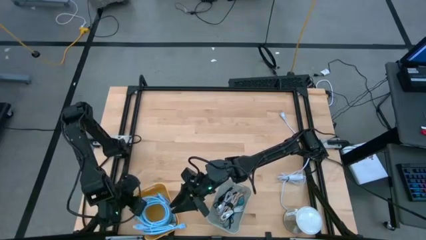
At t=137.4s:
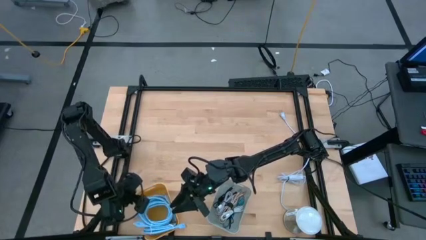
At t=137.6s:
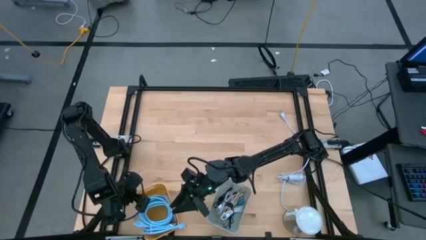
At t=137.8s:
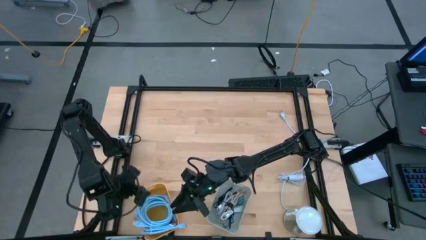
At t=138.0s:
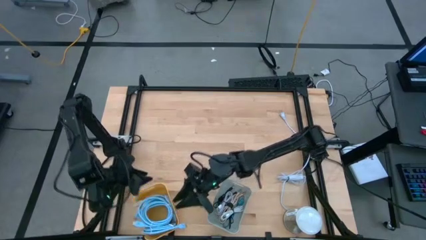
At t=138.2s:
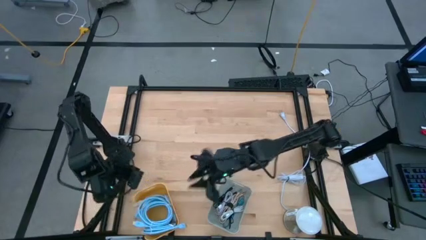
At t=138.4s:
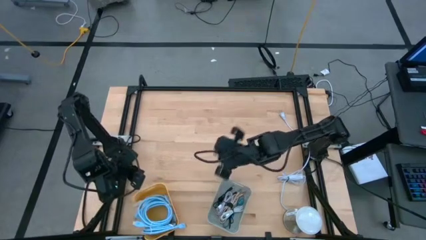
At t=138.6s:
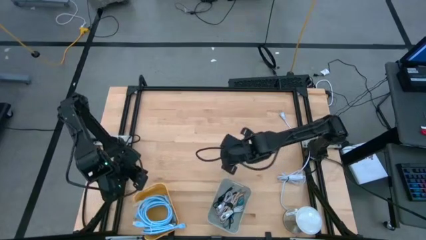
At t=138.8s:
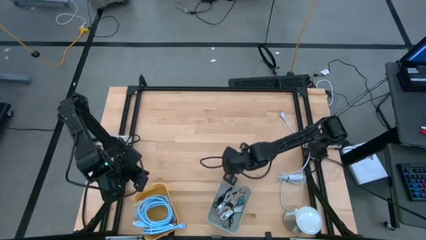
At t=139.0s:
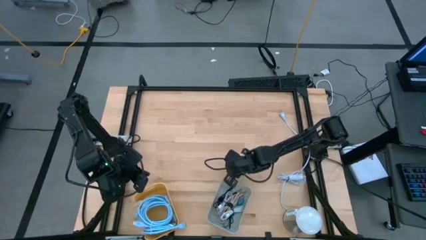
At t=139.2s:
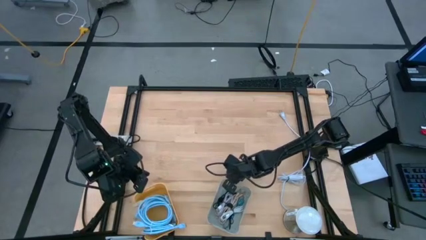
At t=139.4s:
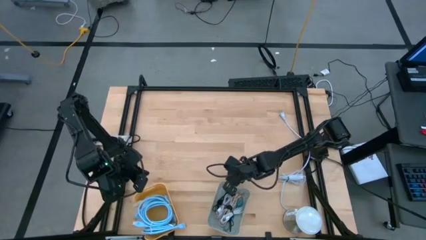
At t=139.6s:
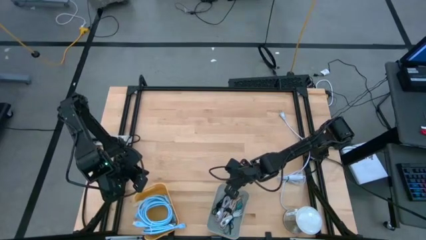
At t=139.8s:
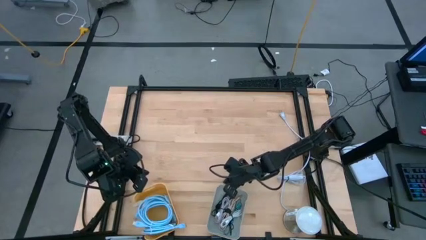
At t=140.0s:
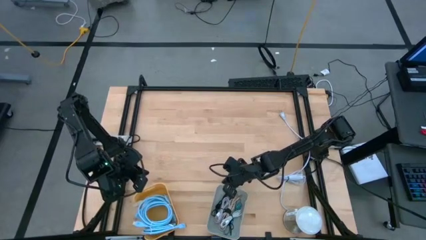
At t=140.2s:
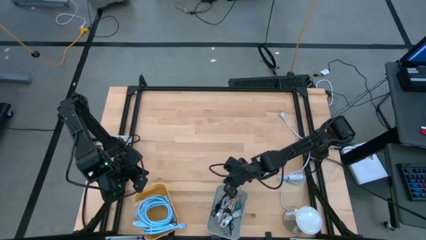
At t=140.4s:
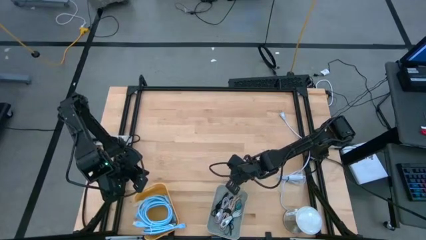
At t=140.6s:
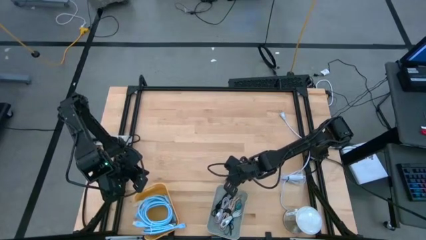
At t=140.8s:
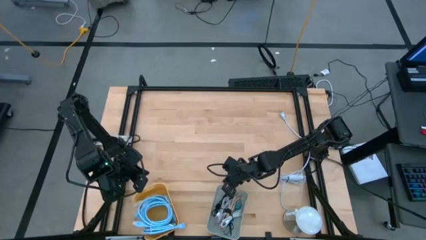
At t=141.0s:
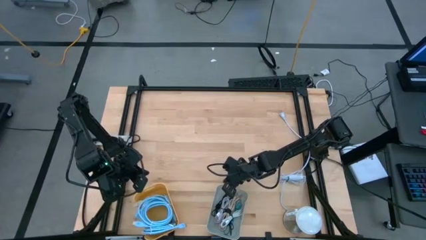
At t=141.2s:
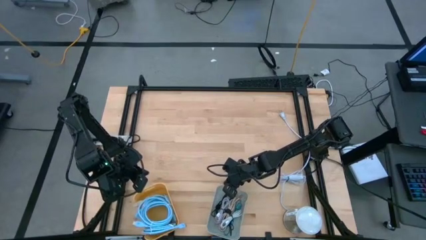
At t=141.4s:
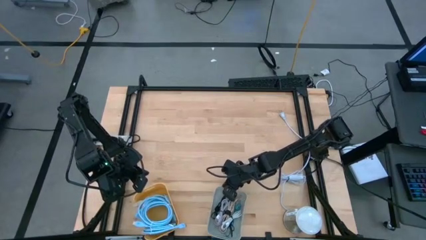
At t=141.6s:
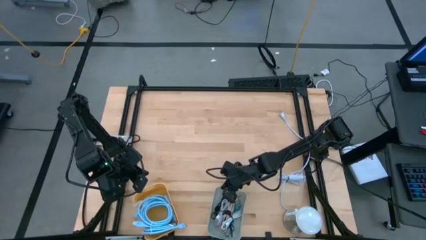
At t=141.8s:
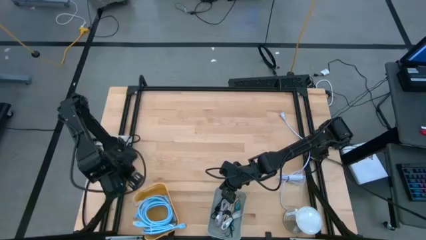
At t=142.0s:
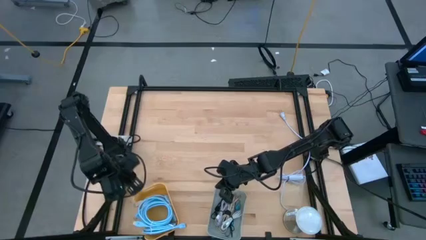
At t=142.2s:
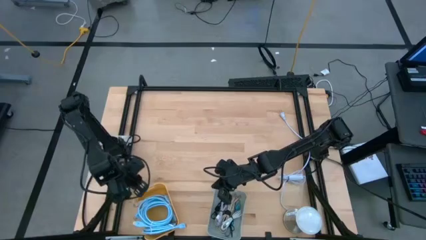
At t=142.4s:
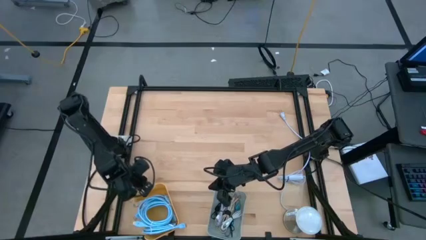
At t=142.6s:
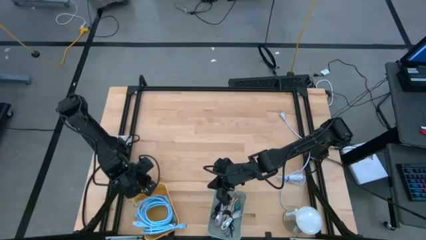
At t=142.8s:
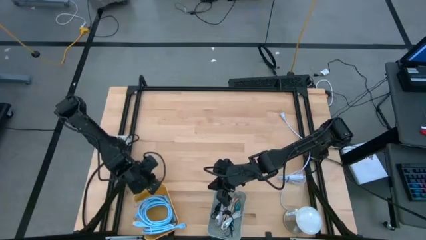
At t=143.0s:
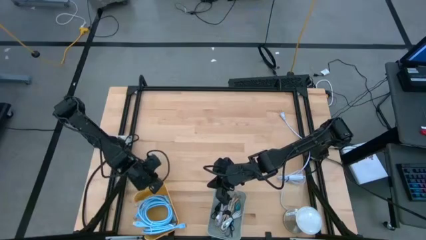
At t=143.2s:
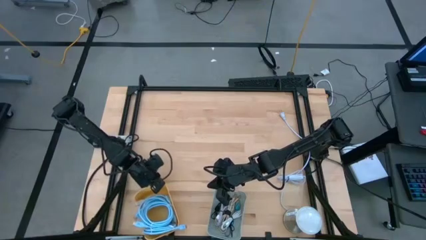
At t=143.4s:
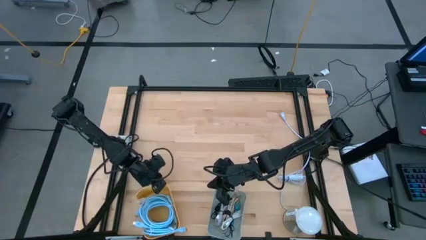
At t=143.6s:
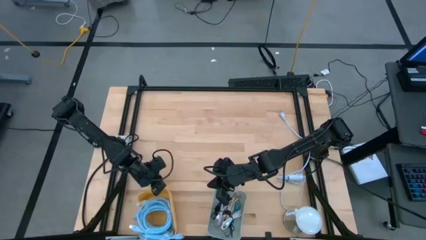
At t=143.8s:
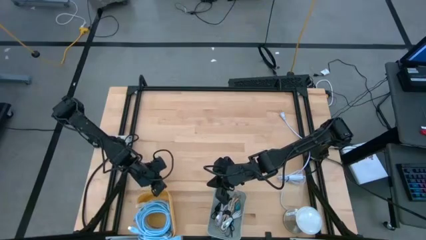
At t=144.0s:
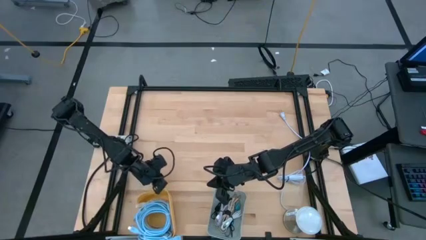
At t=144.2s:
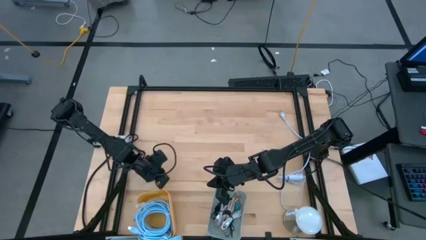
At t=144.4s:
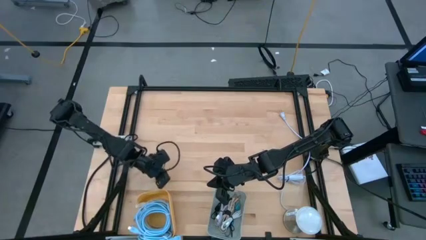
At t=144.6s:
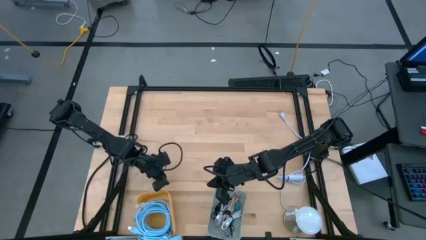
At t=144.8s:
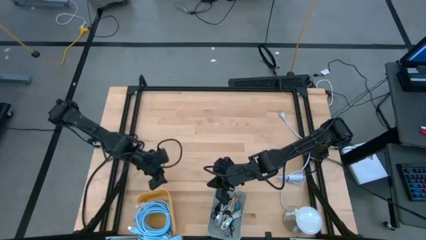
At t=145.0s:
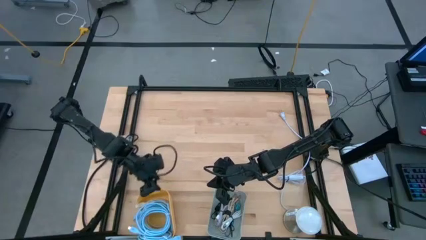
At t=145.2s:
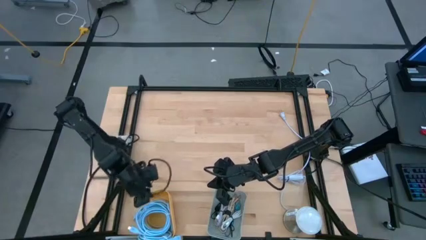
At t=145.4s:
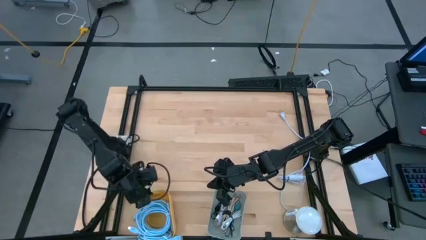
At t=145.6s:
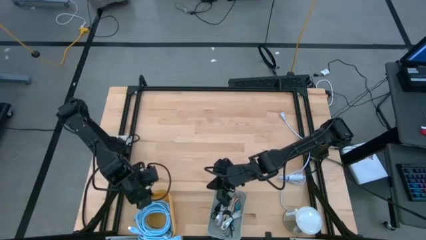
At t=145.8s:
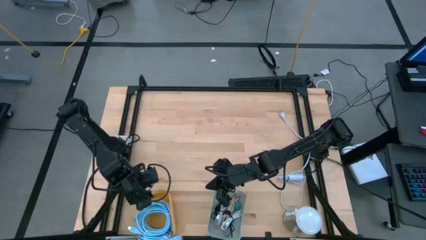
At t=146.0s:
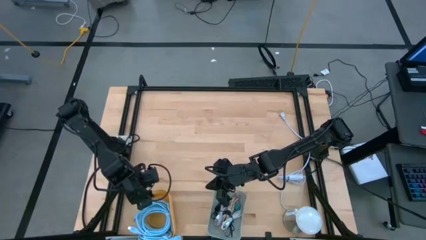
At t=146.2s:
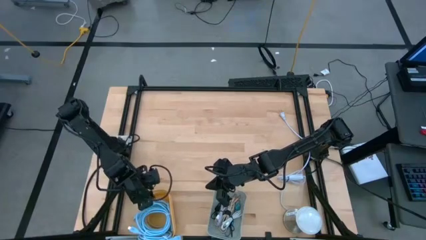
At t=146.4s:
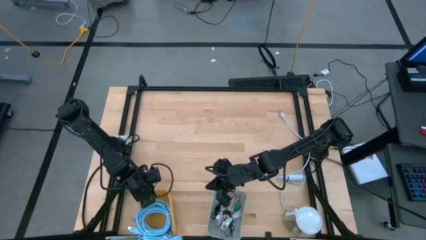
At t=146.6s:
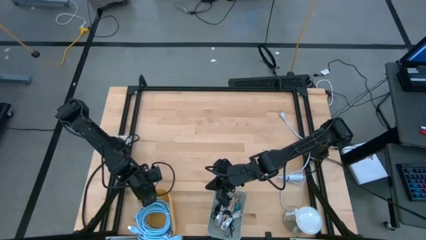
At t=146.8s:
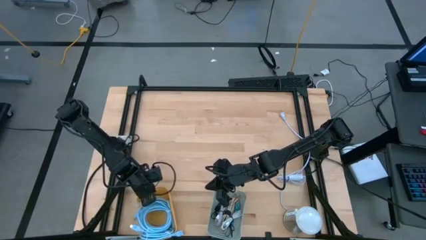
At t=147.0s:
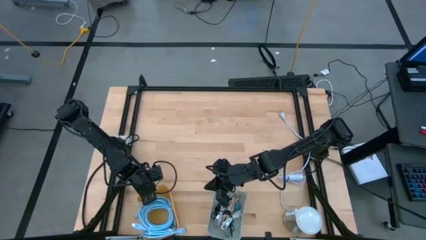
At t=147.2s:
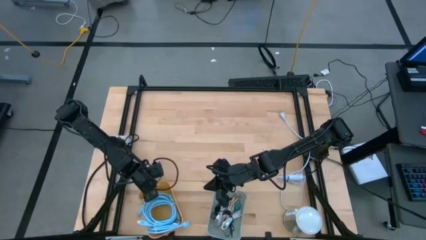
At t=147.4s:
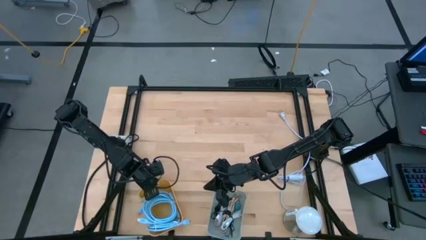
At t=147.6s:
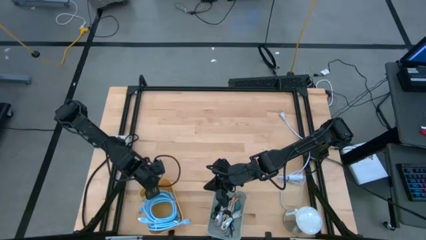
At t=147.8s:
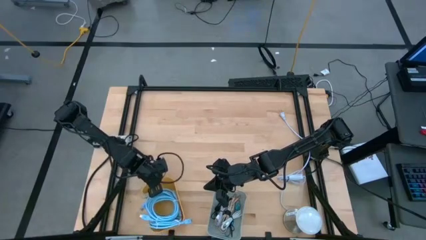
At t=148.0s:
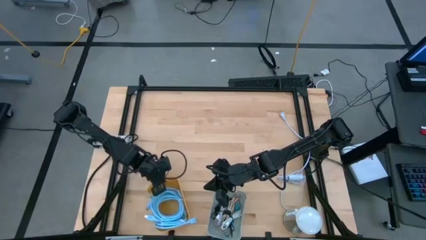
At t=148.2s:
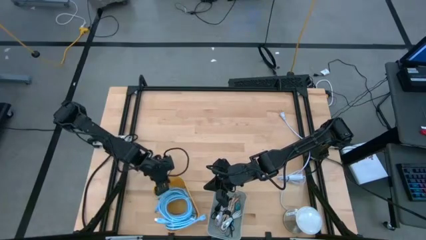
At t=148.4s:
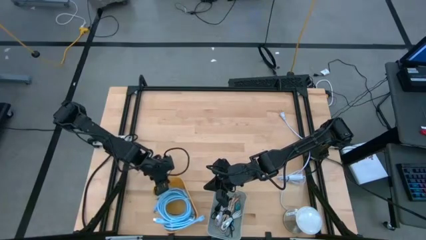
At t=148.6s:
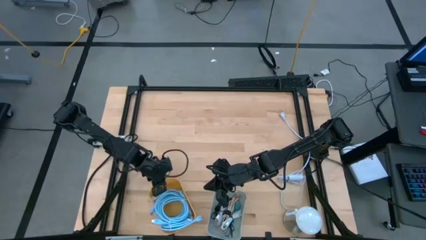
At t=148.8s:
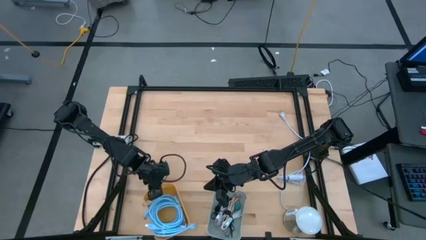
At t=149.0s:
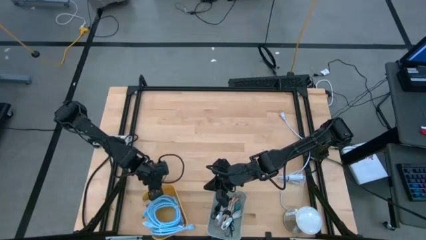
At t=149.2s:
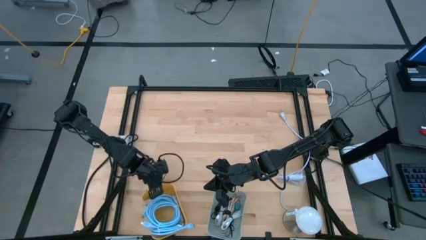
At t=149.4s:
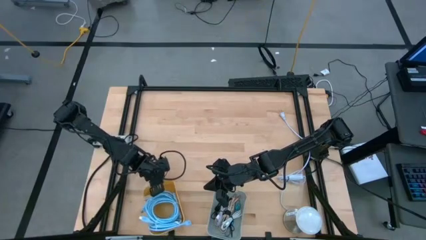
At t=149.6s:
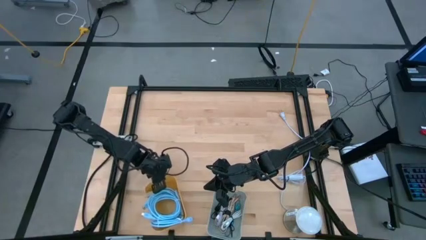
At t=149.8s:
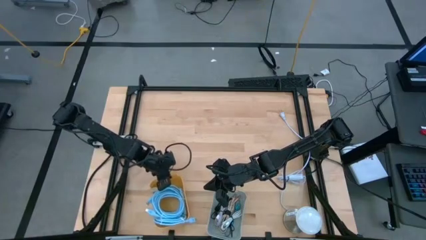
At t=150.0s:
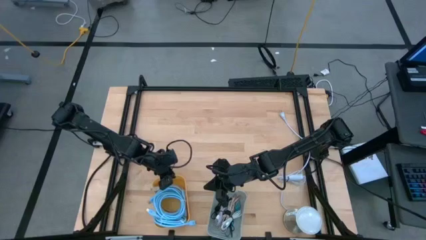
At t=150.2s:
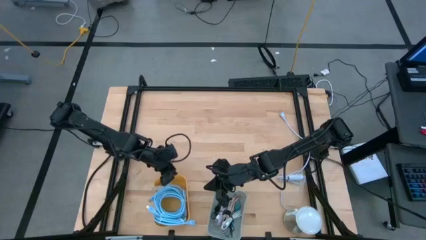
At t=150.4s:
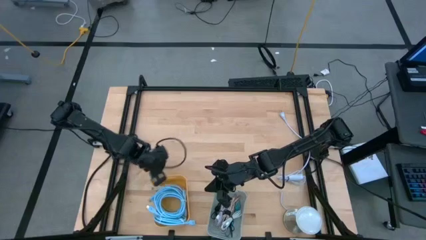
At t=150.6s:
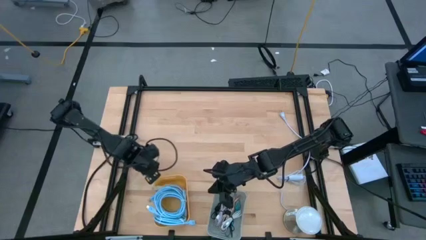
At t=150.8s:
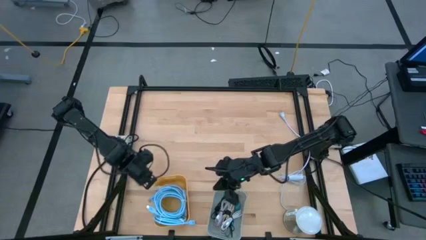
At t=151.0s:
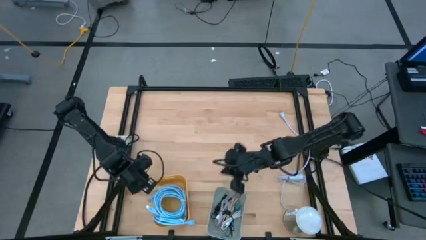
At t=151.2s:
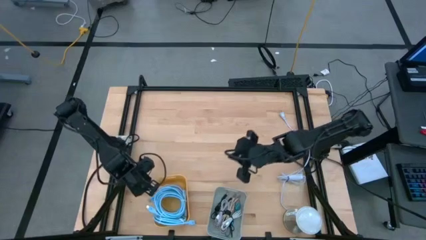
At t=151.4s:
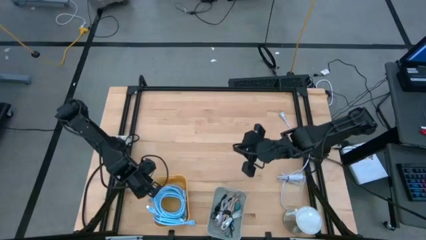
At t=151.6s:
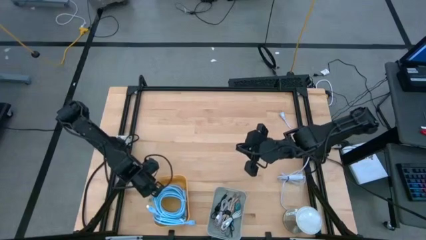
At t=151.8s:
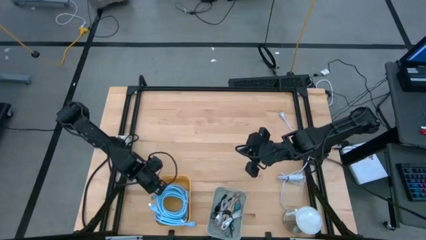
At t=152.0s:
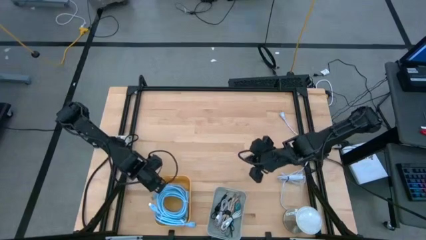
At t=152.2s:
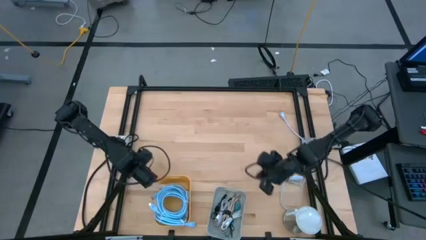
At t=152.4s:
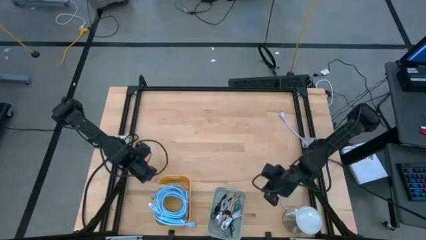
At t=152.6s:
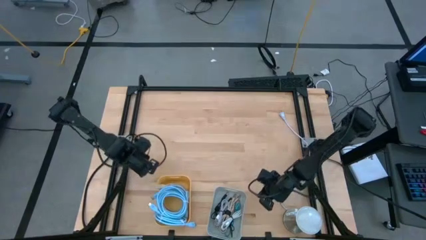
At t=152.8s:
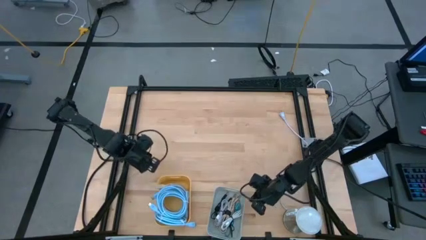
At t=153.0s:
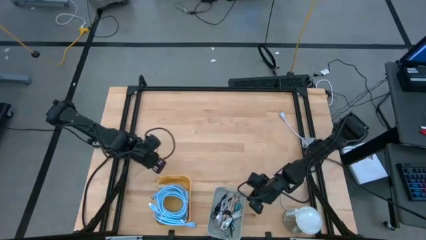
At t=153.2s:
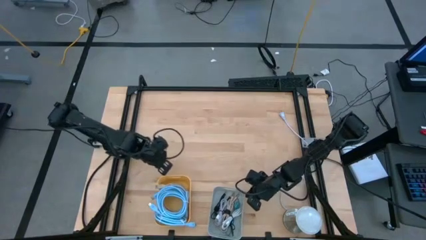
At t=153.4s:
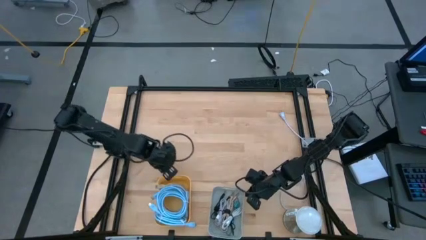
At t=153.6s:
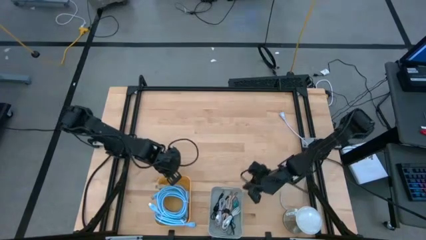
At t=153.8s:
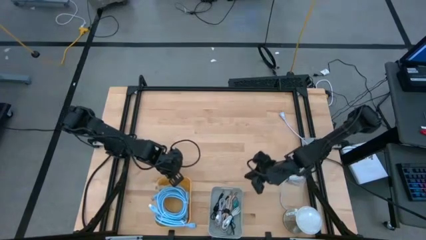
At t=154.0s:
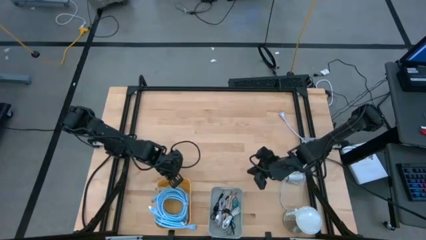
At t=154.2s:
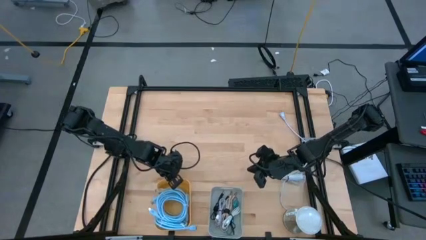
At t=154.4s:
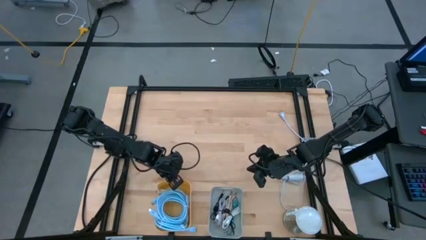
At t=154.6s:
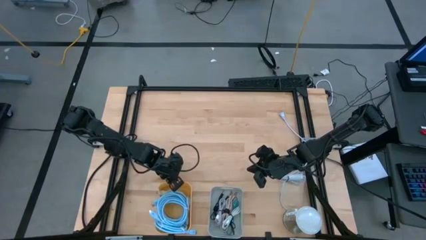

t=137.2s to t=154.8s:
Task: Sort cables
Adjust the bins
